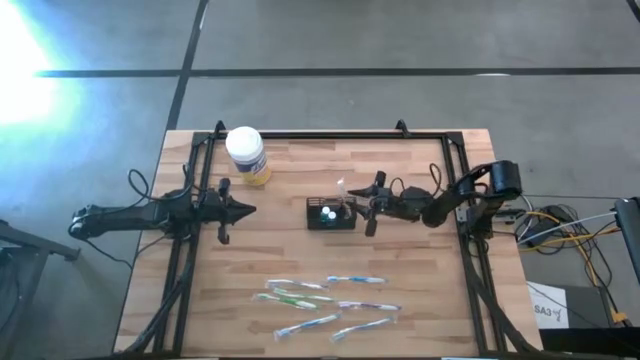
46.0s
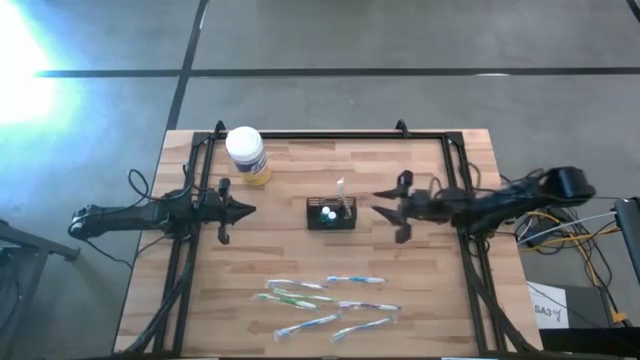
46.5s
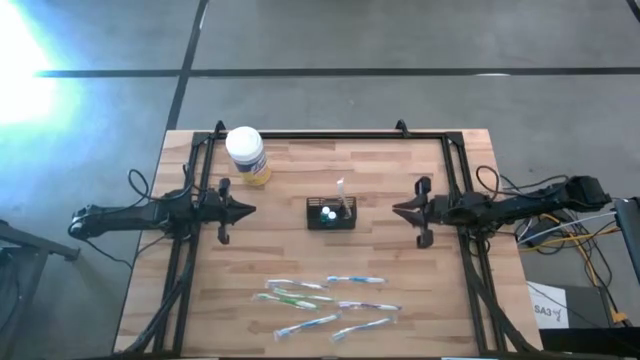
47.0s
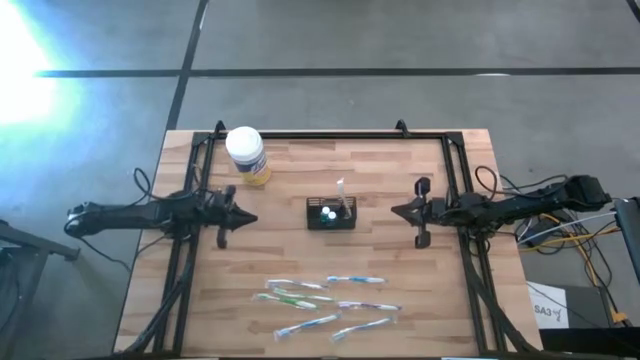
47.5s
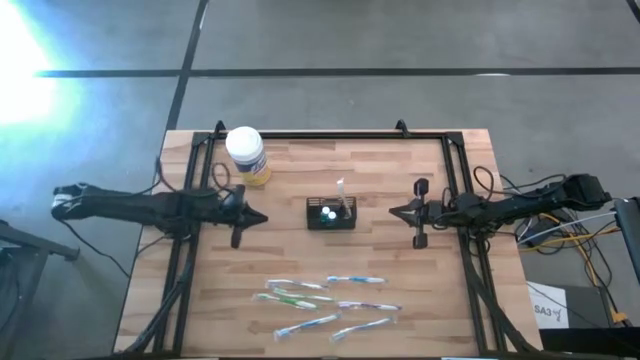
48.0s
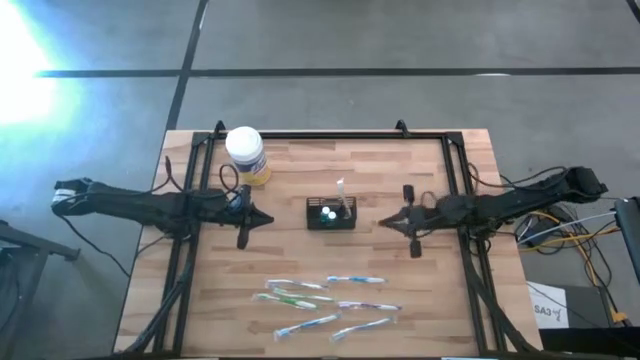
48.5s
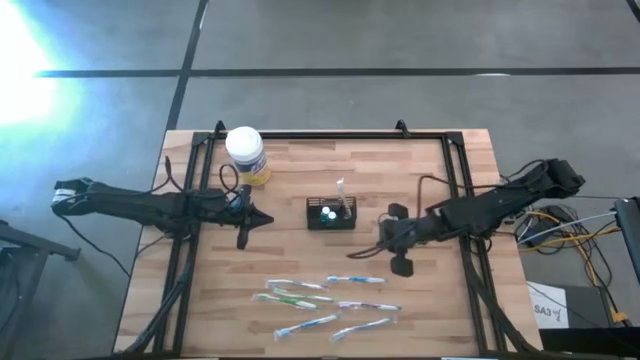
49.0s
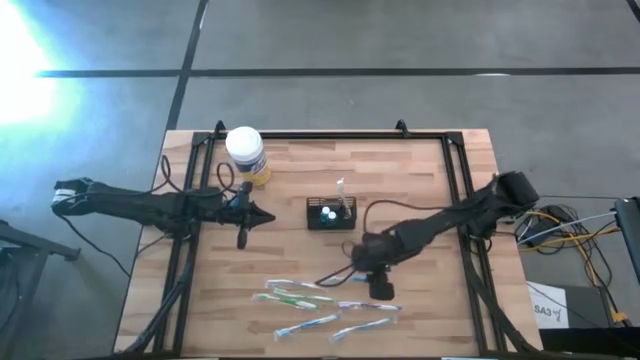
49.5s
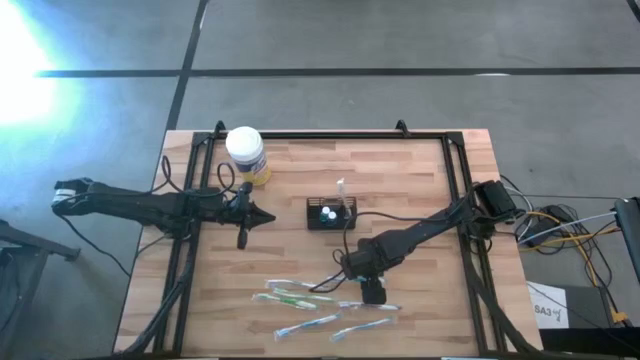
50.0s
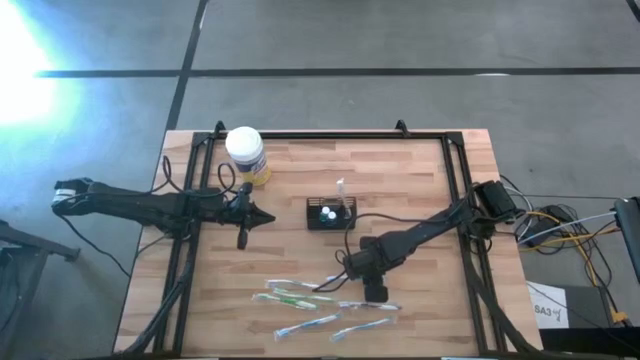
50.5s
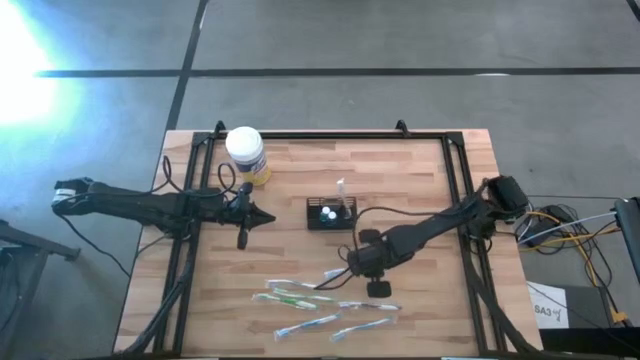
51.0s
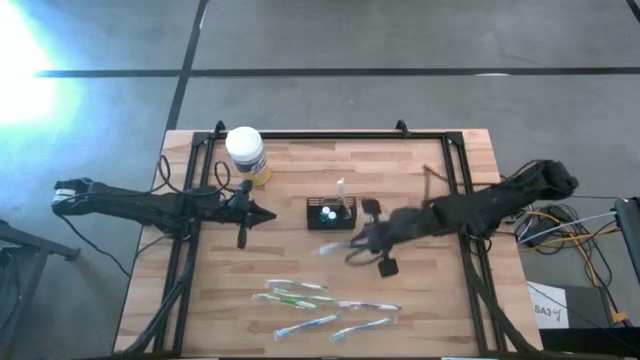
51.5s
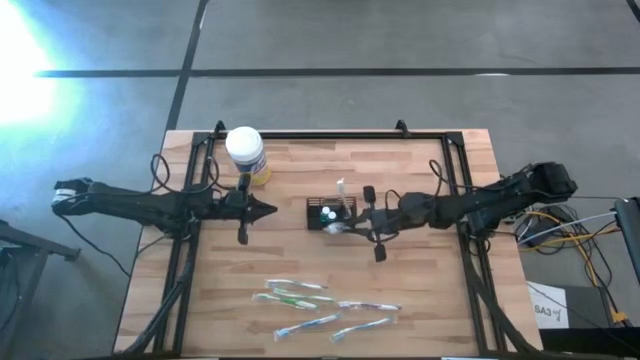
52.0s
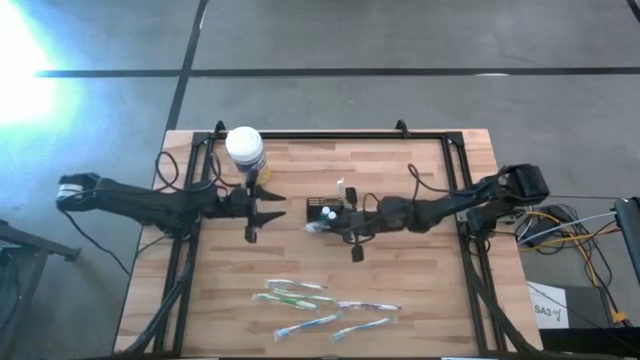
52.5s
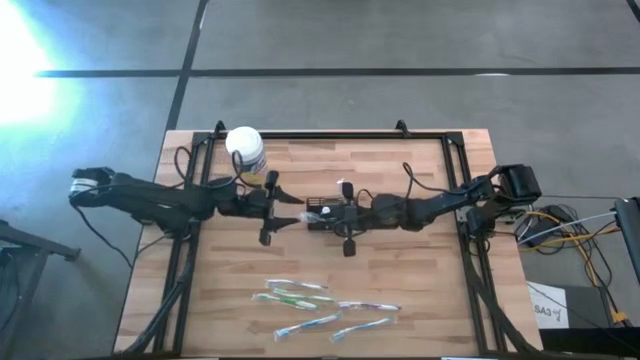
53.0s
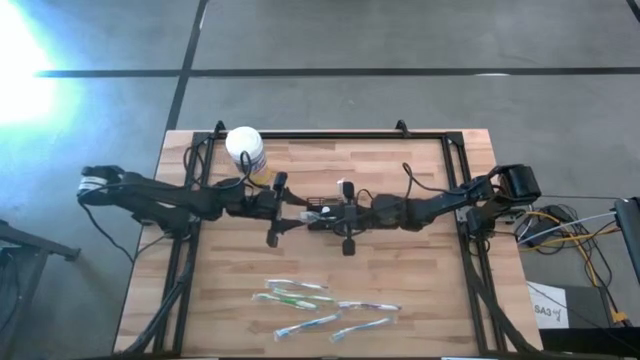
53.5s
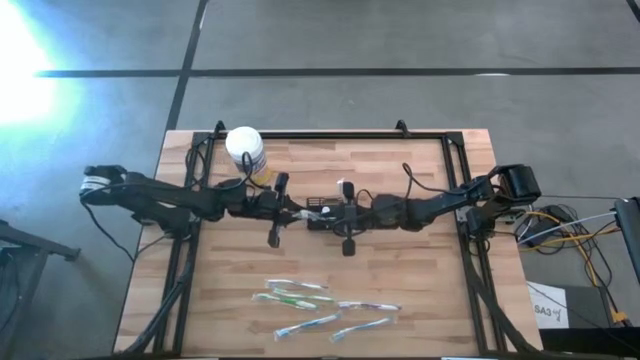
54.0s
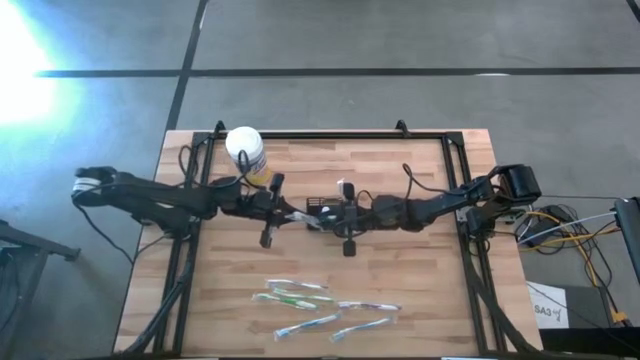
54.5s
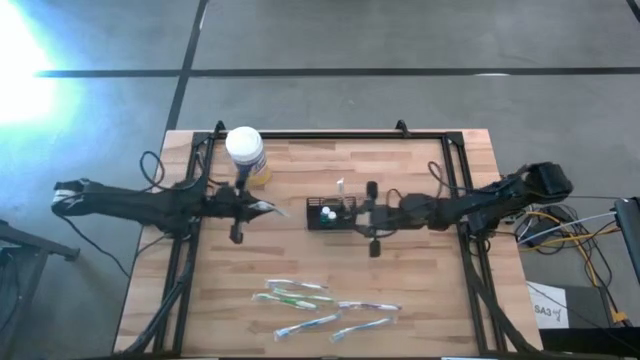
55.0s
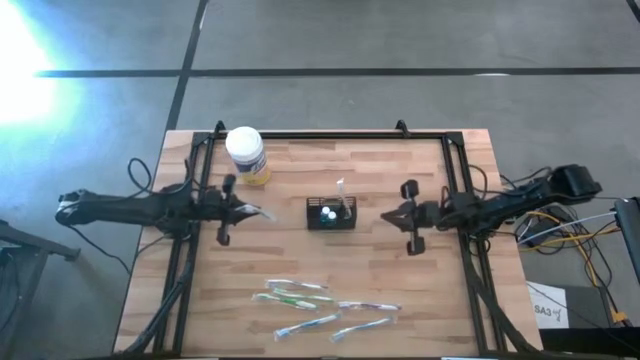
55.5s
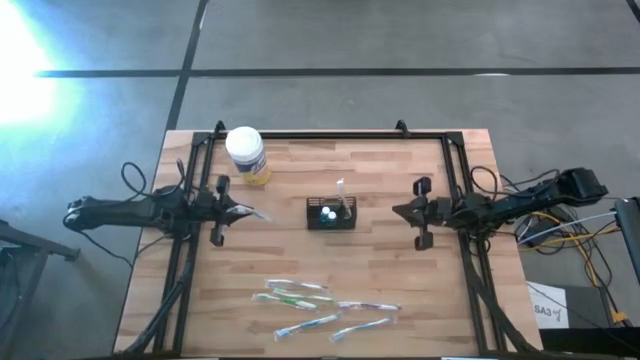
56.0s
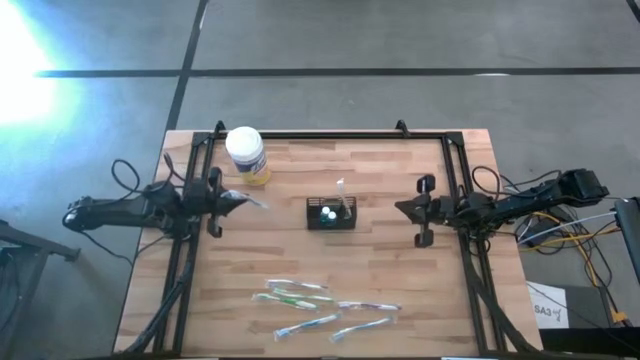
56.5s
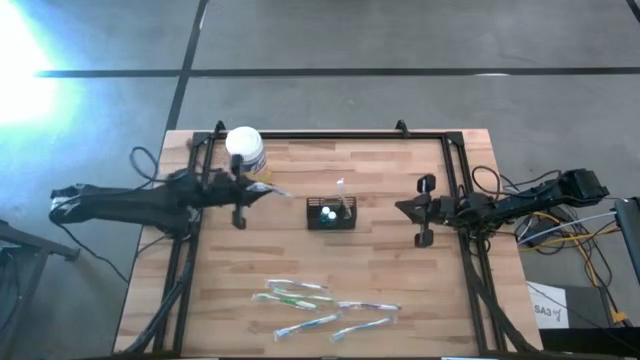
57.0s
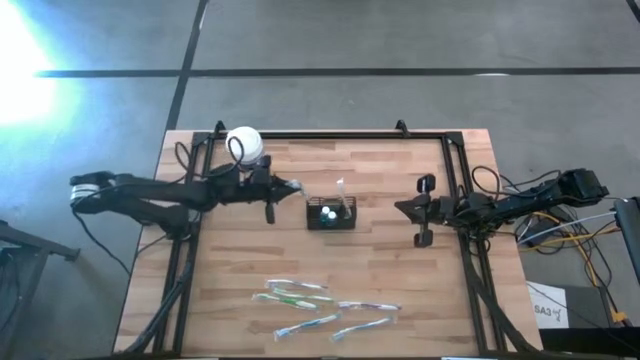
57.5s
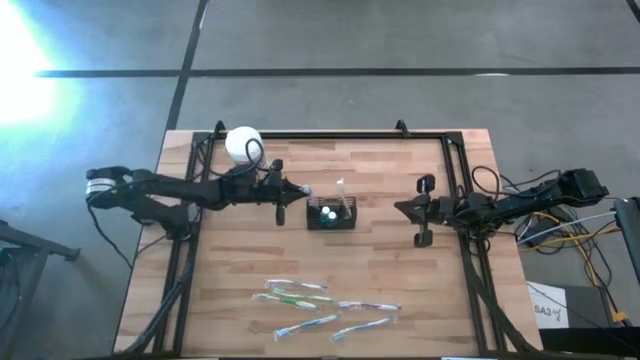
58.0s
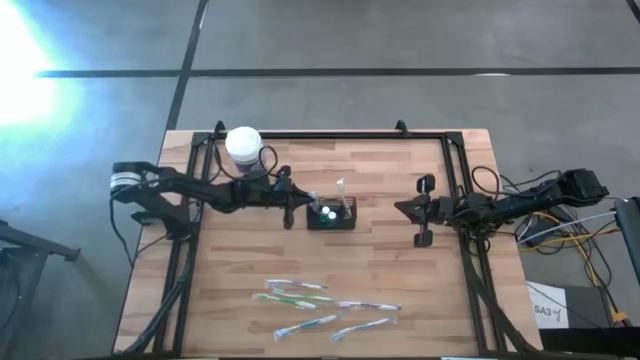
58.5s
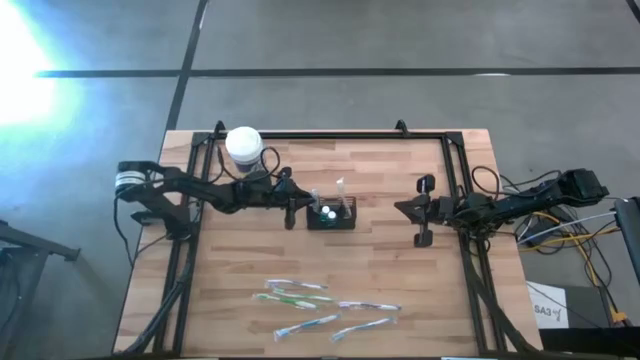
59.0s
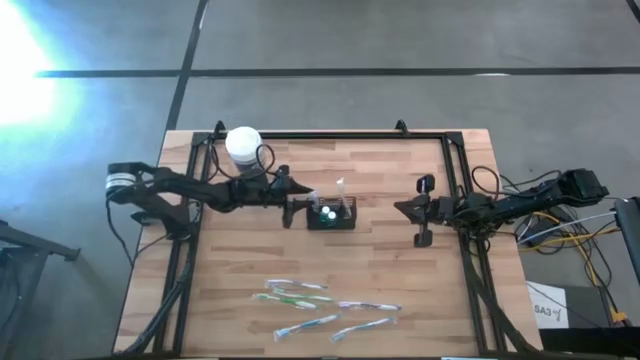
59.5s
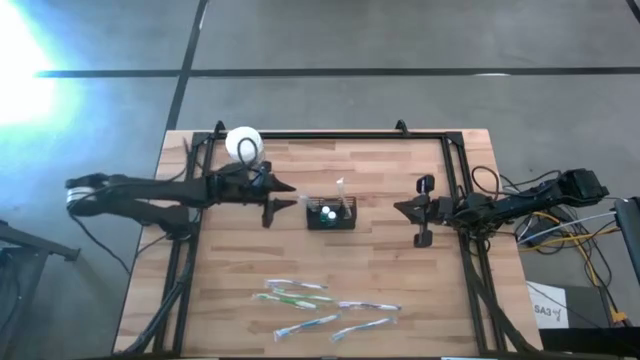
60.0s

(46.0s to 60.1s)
Task: Pick & Place toothbrushing station
Put the top blue toothbrush into the black wire organizer

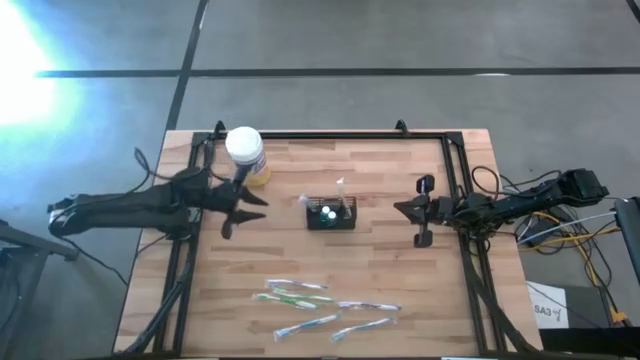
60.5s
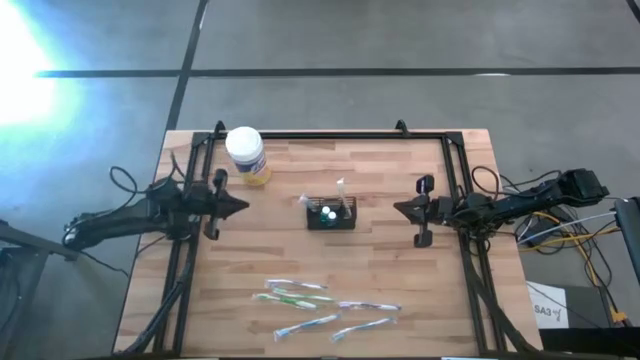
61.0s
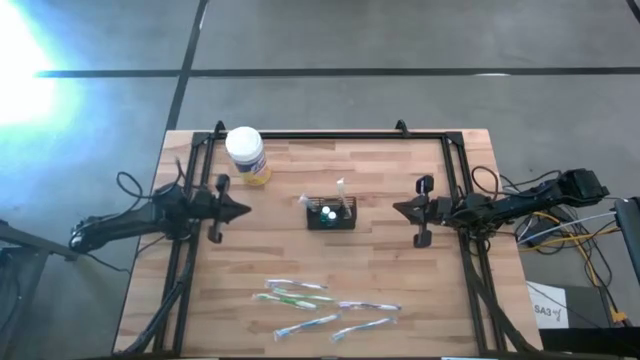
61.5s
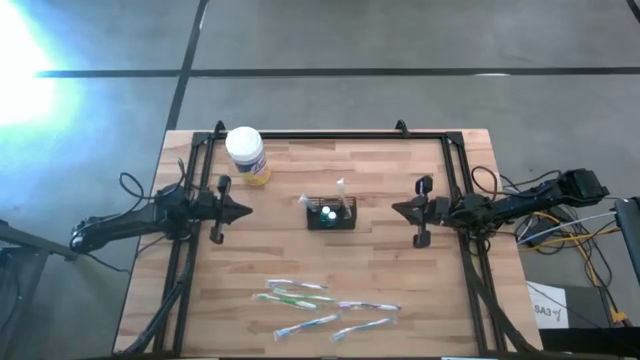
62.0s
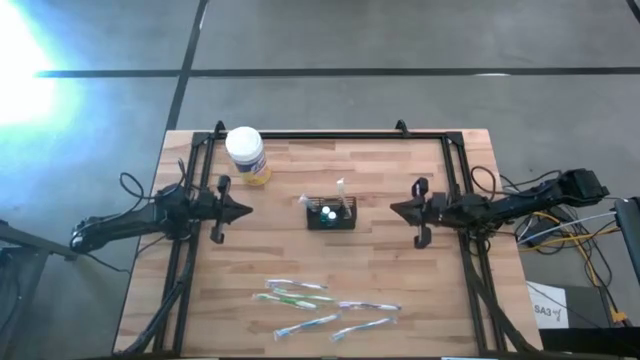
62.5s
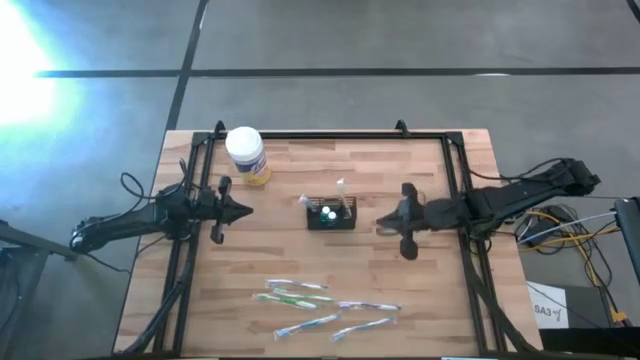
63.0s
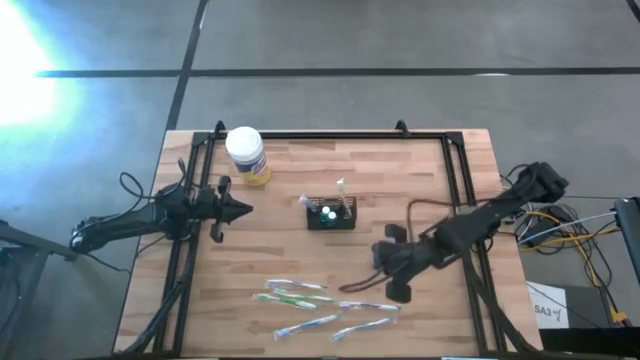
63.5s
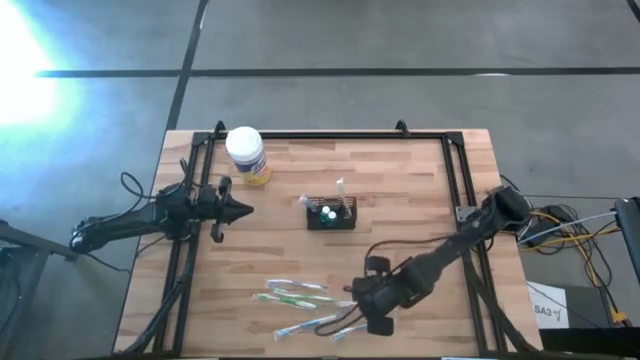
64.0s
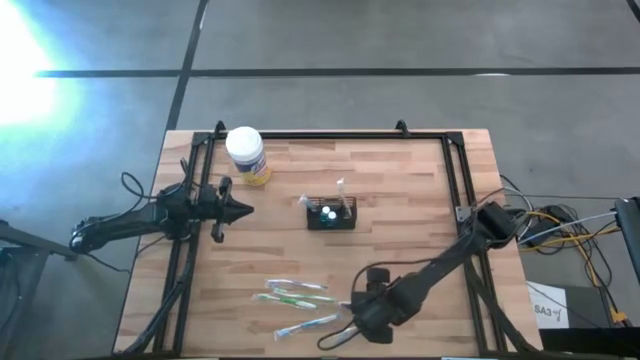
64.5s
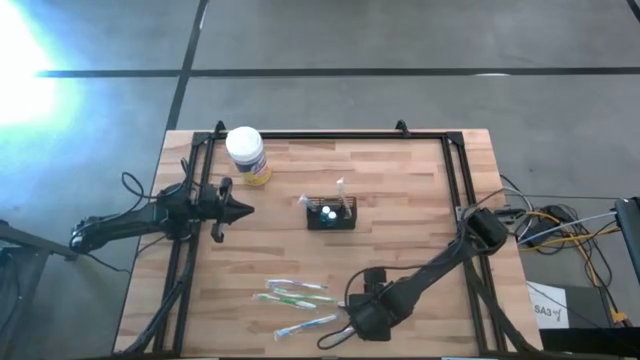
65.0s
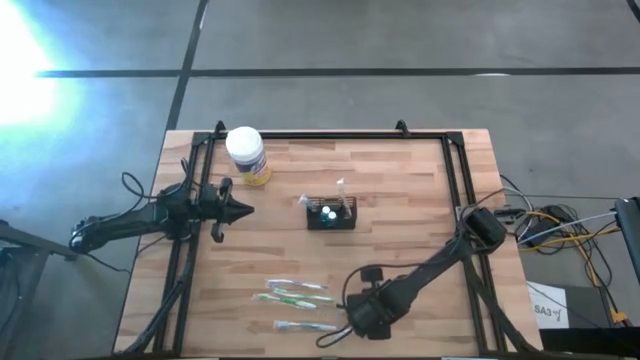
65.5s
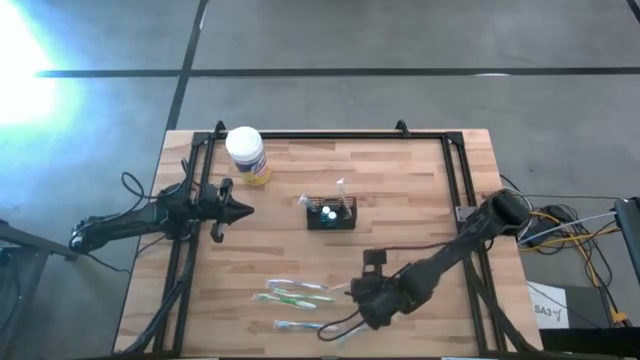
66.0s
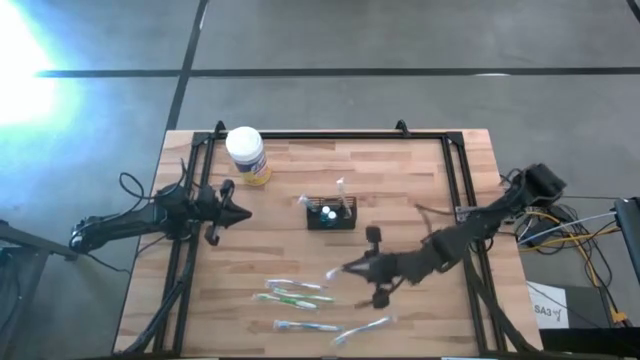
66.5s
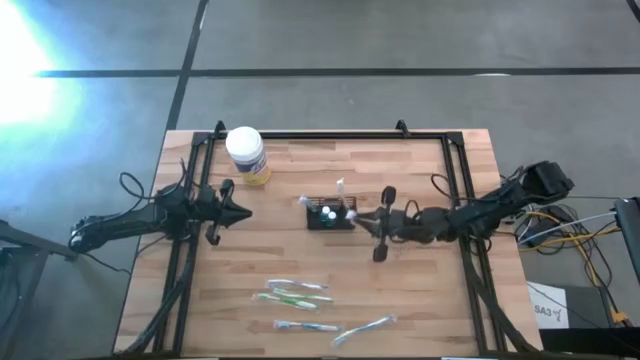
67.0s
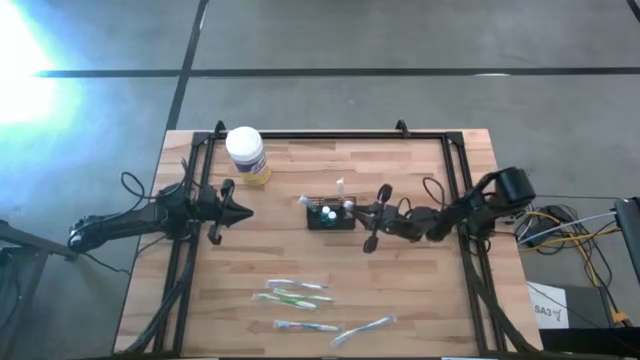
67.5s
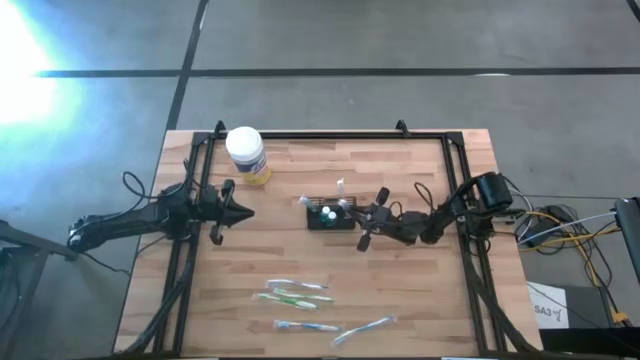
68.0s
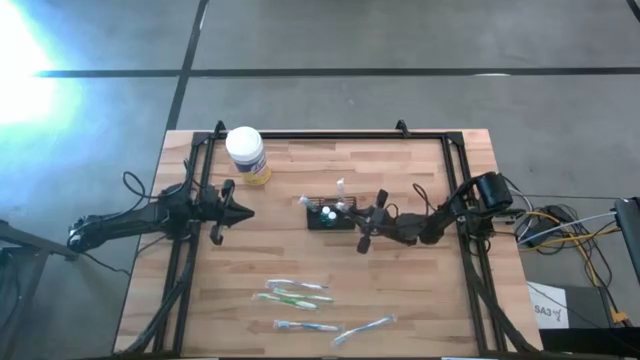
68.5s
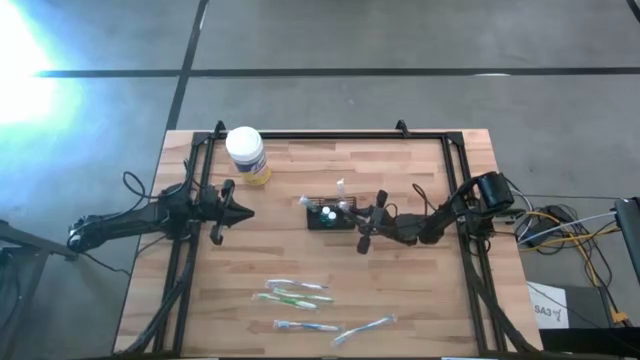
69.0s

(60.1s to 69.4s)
Put the bottom purple toothbrush into the black wire organizer
